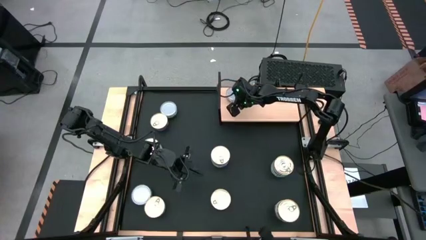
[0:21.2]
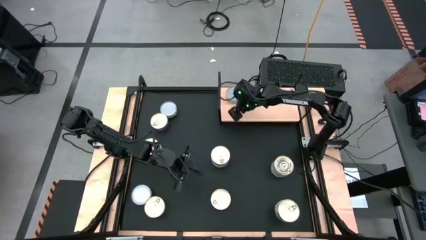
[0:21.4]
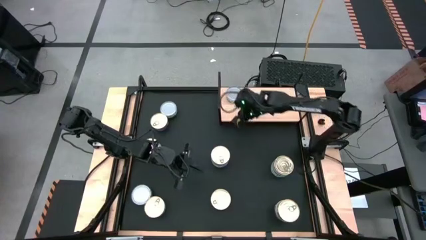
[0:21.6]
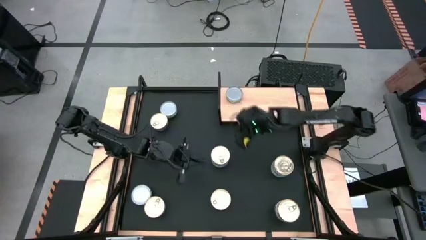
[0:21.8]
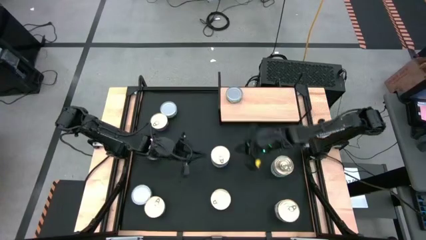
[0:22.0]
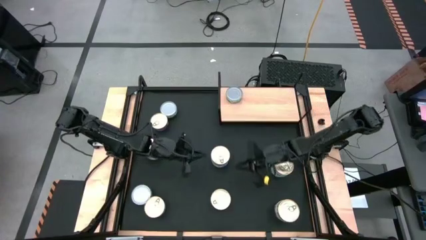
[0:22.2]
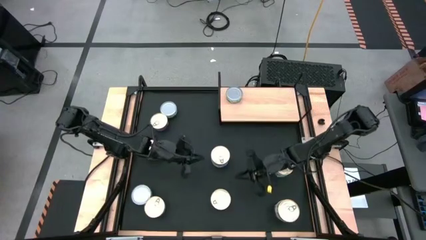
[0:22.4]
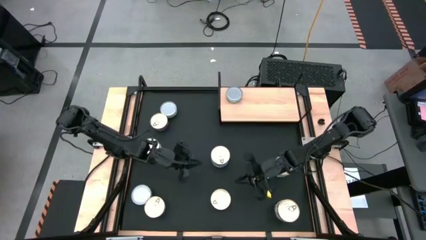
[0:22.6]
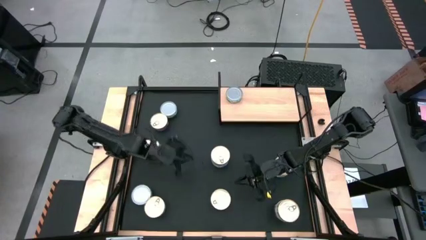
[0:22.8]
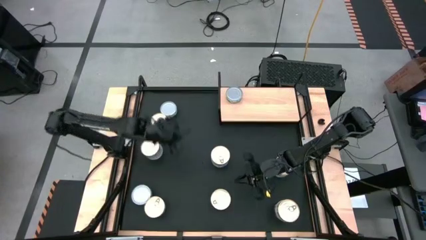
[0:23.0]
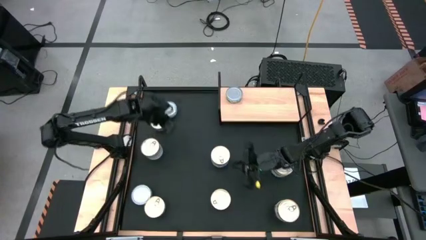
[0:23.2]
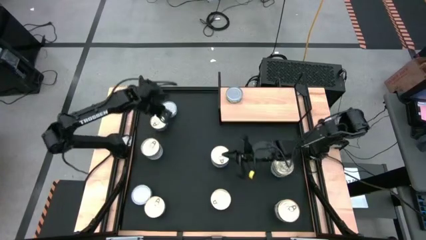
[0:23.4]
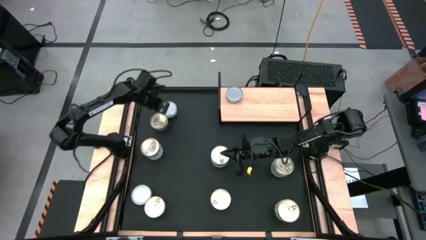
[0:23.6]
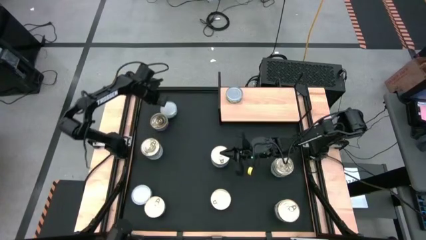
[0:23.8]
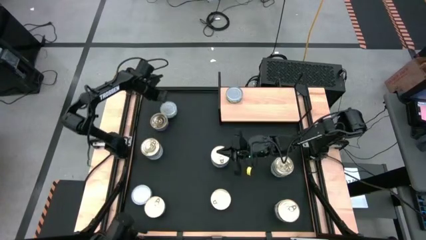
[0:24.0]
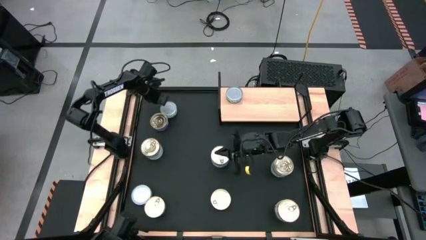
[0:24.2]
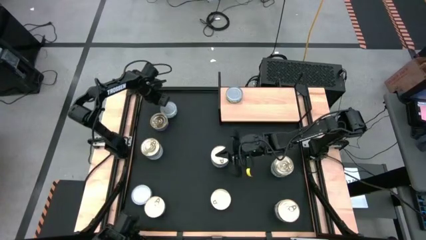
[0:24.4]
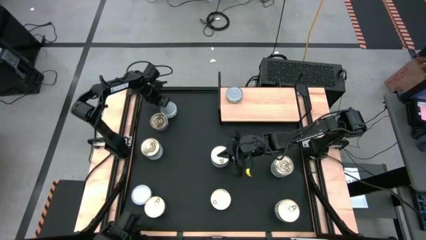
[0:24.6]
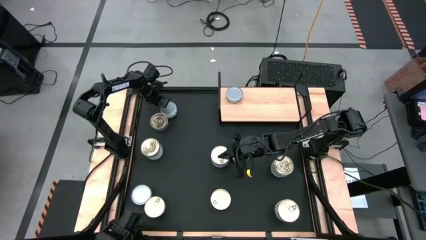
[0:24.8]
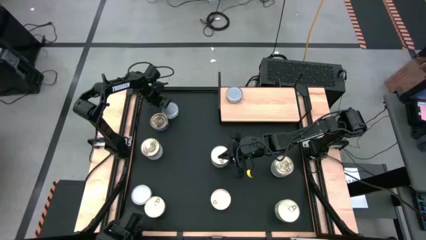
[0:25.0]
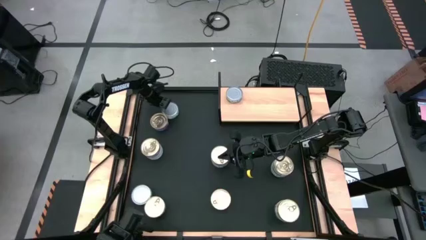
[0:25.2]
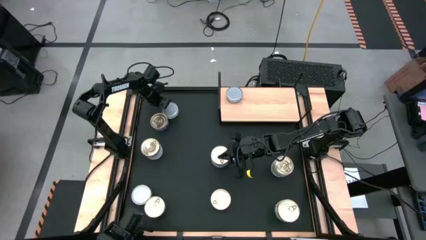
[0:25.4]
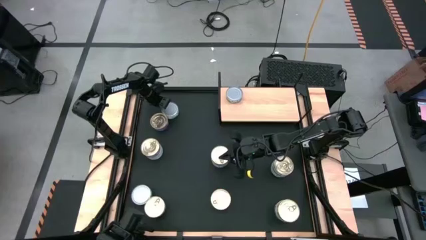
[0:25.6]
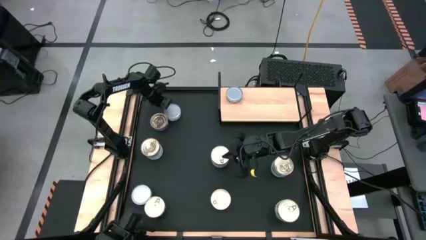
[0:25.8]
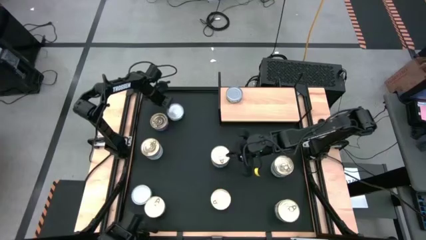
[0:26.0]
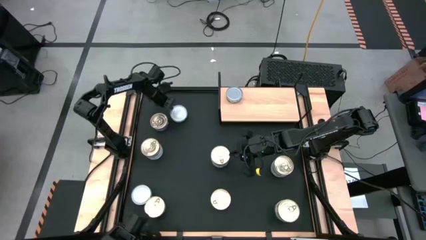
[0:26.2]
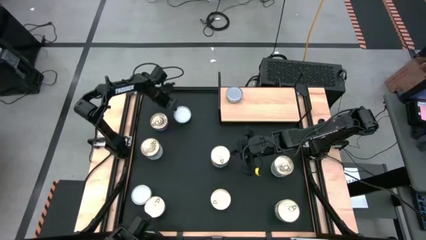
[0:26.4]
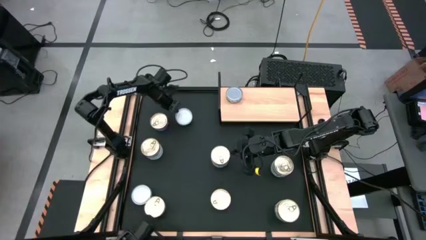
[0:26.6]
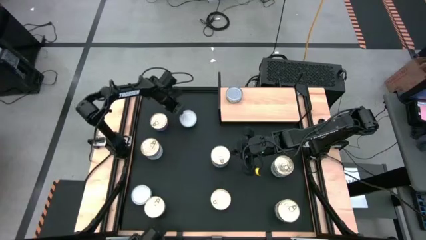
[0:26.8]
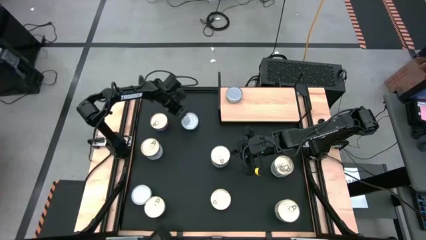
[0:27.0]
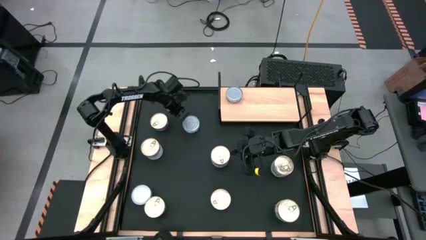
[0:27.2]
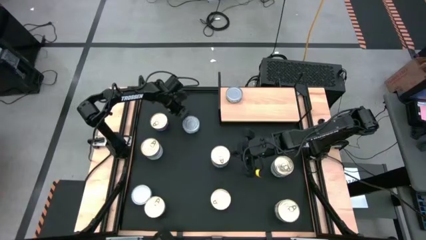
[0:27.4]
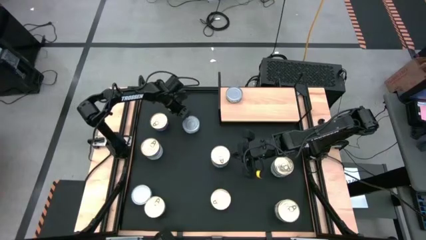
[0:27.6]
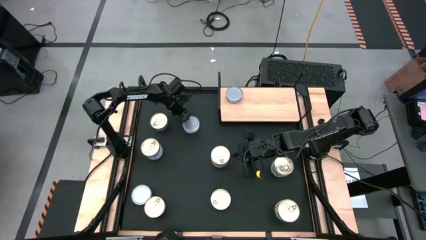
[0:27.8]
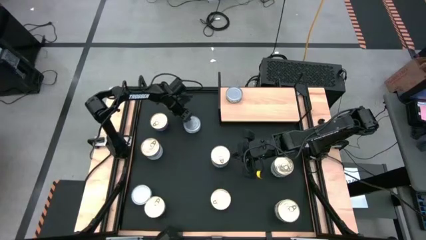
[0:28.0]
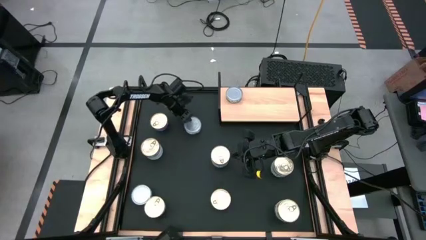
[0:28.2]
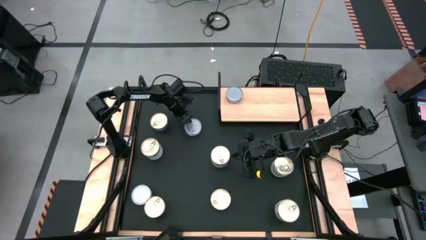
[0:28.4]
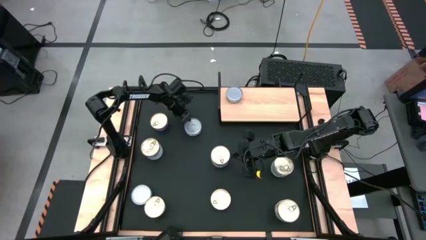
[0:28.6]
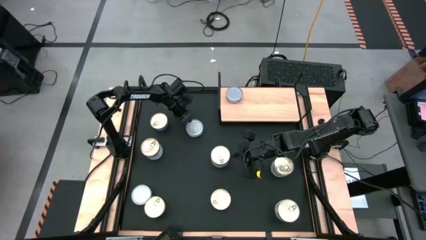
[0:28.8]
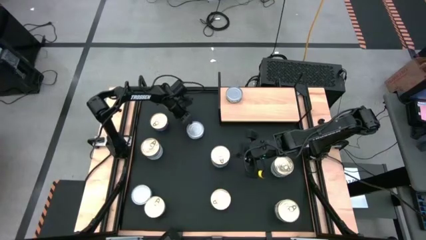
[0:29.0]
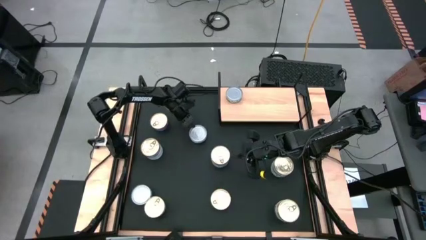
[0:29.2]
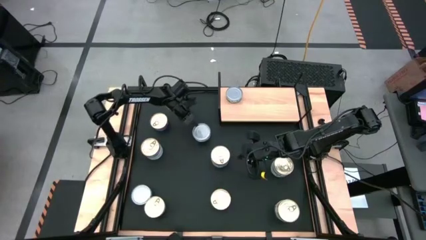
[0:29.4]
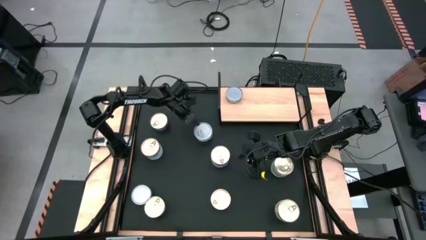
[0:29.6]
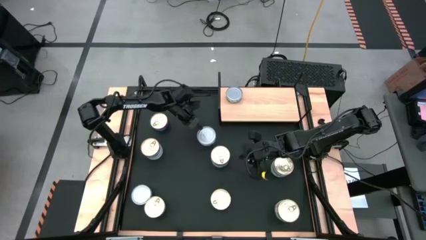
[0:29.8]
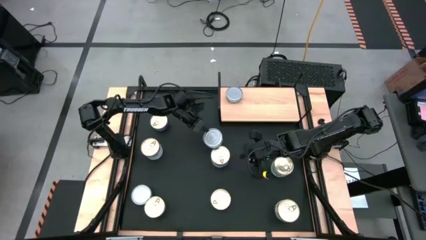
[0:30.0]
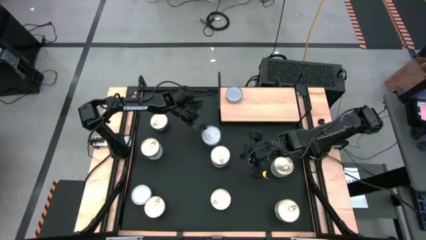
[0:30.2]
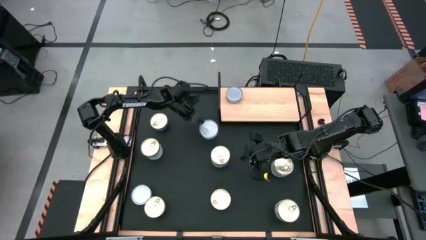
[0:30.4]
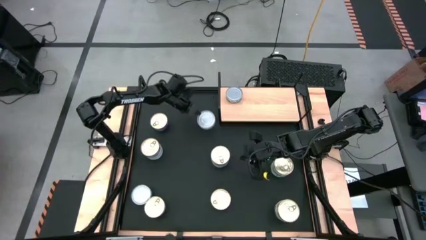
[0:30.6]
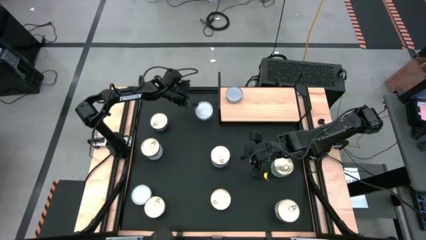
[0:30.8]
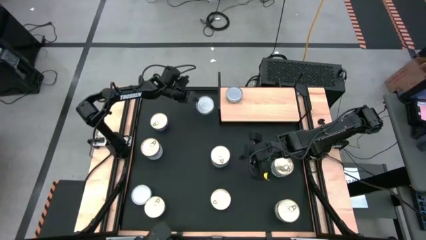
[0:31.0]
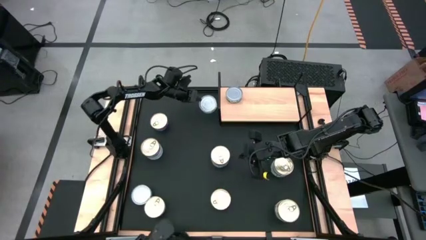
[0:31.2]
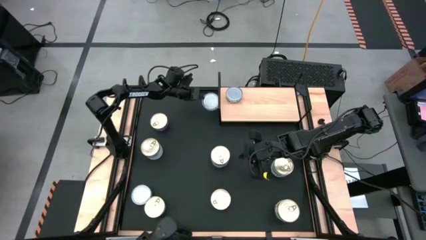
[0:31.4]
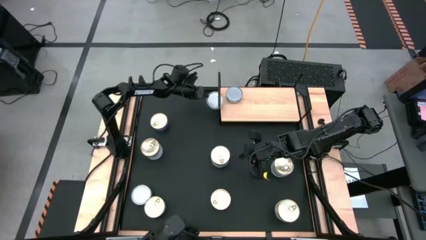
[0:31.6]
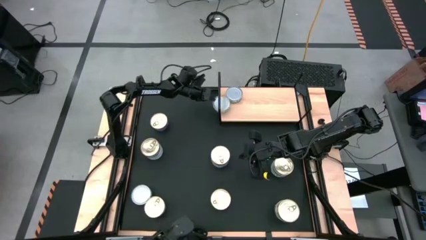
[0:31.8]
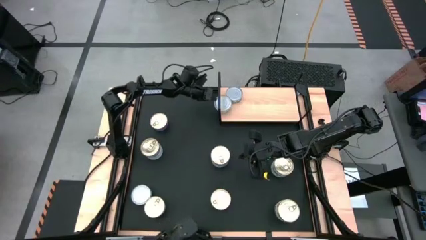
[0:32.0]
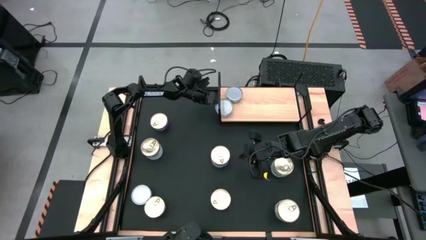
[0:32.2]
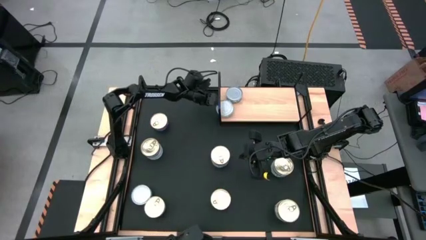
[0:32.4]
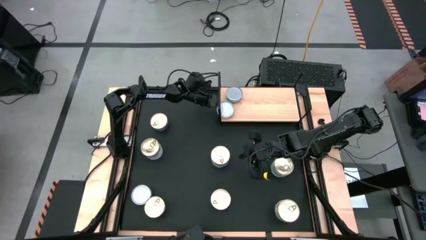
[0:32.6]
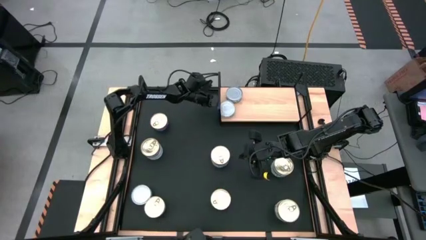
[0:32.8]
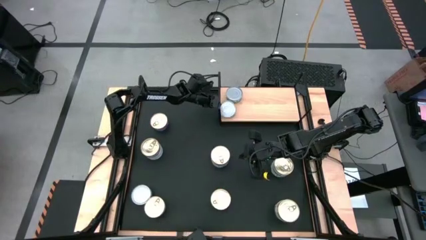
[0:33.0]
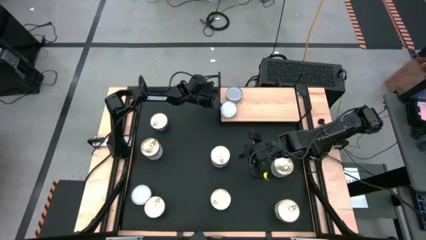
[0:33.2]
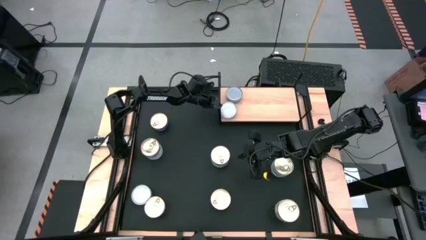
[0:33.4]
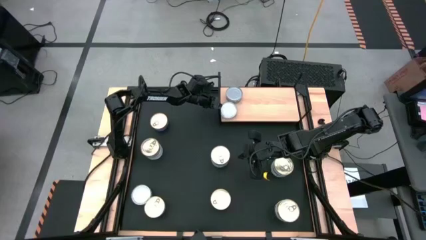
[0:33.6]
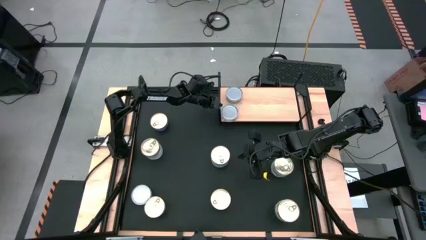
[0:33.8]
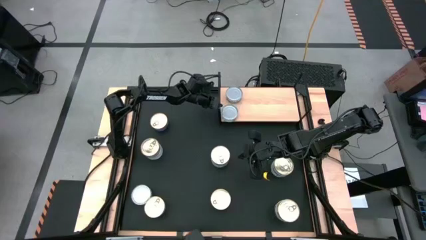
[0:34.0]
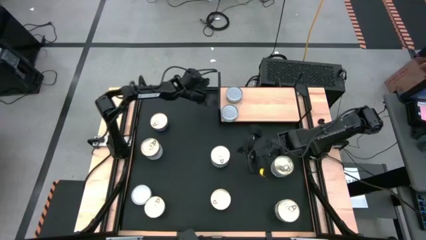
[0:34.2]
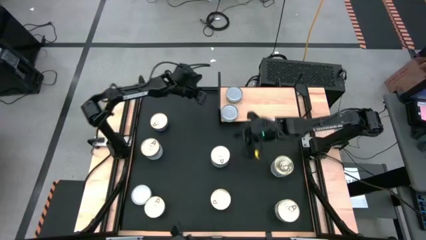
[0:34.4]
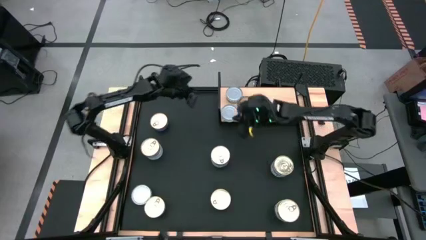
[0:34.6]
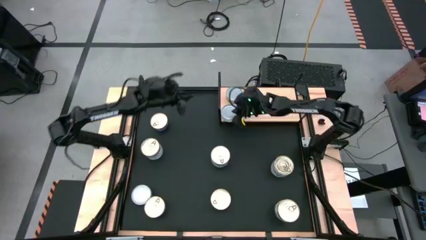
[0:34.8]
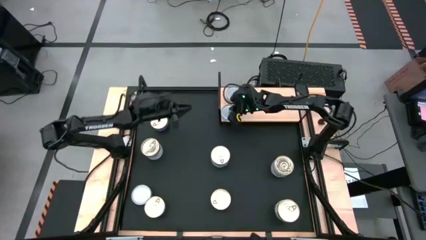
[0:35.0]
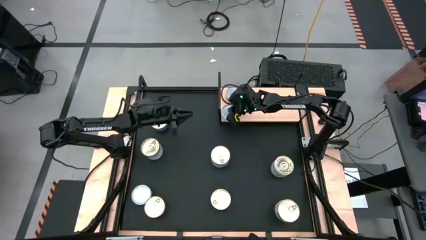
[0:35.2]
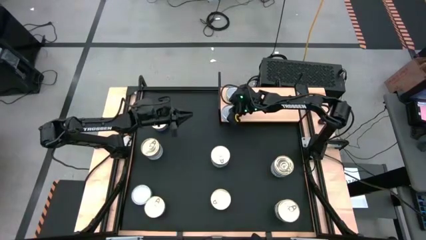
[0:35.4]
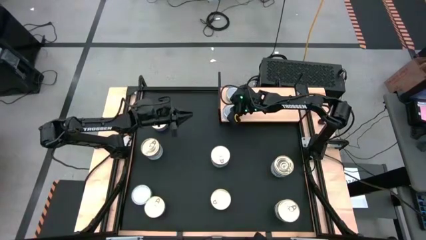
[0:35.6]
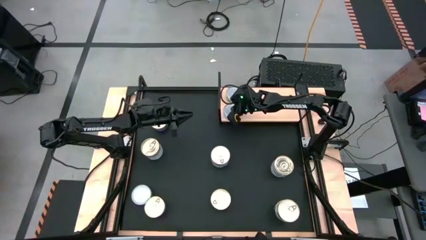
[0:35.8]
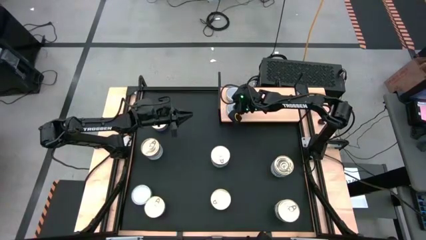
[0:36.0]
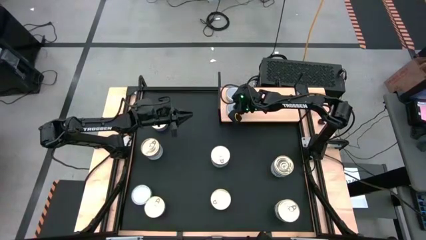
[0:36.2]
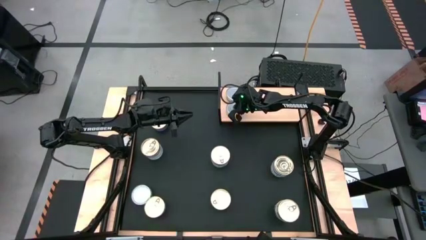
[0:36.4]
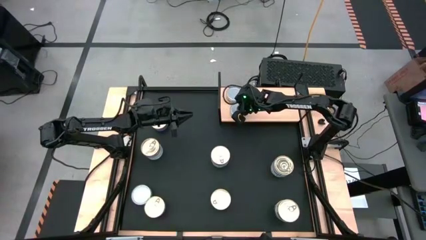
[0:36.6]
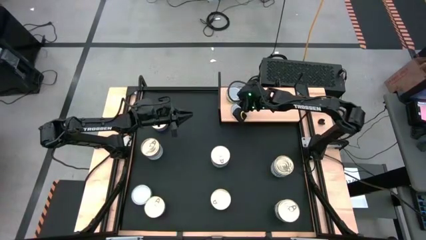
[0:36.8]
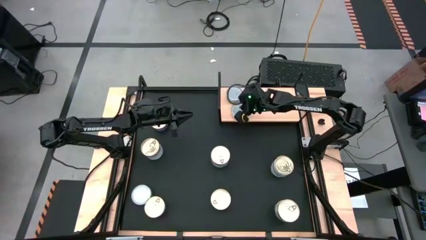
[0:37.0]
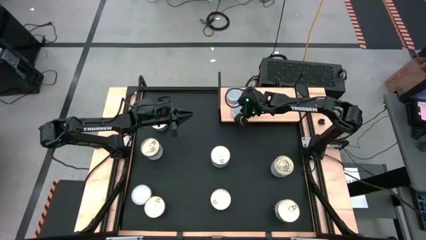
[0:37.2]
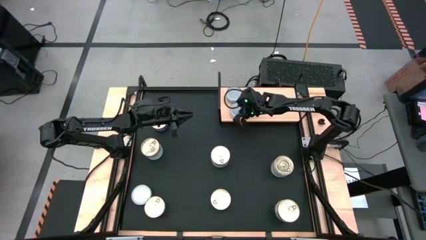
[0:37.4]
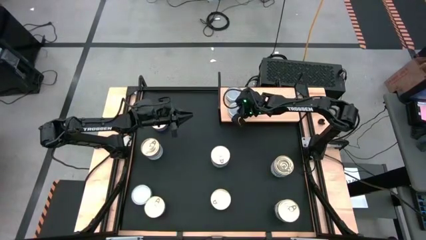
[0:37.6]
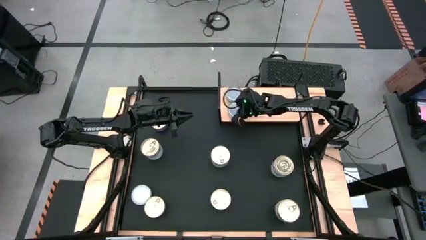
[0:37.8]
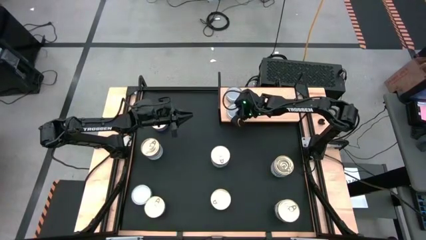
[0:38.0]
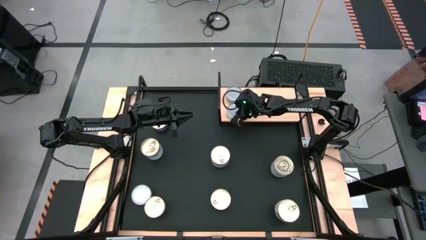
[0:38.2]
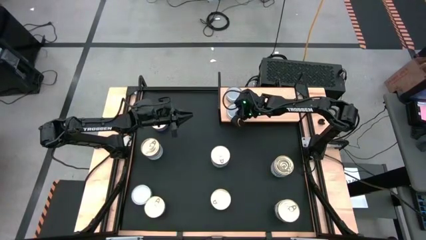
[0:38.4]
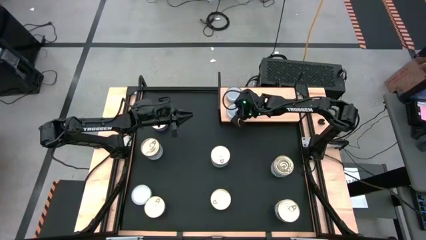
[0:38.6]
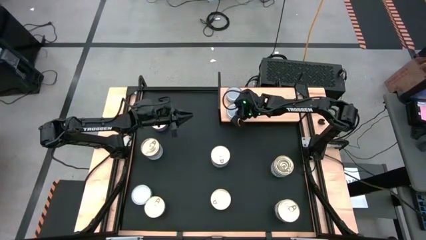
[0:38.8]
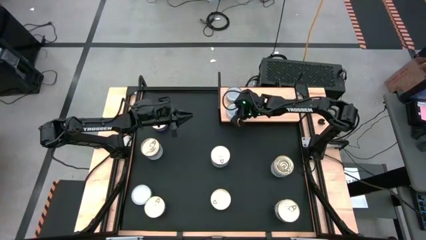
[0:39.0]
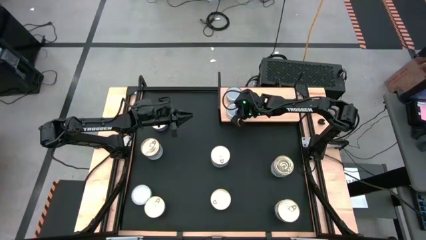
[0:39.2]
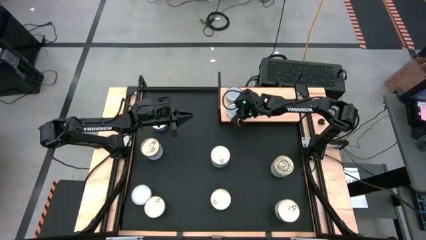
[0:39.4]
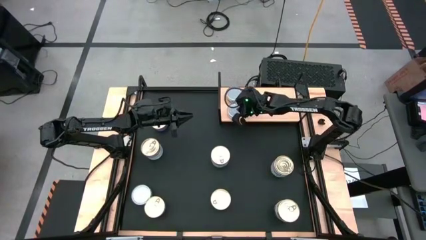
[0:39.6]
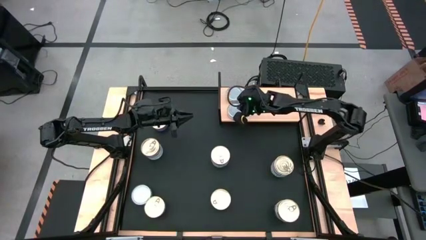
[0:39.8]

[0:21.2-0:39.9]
Task: Stack canned seafood by type on shelf
Put the green can on the shelf
